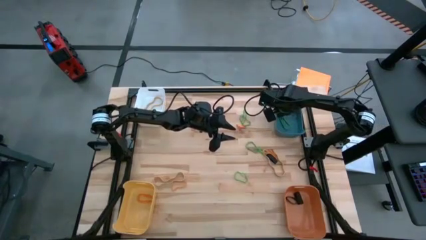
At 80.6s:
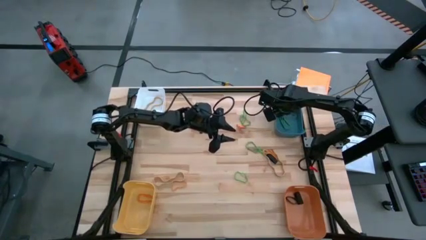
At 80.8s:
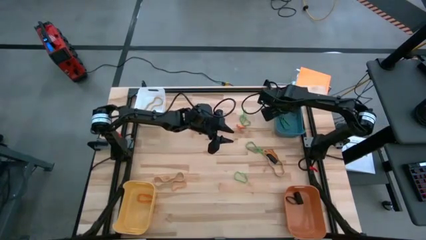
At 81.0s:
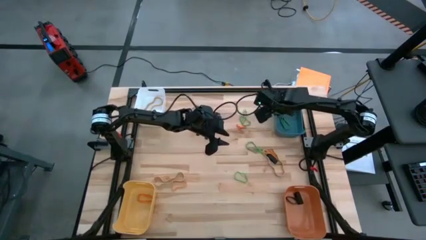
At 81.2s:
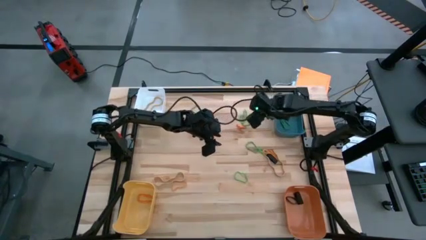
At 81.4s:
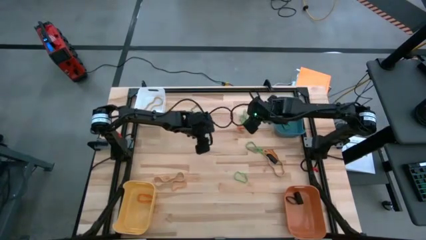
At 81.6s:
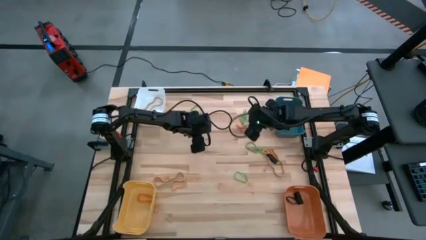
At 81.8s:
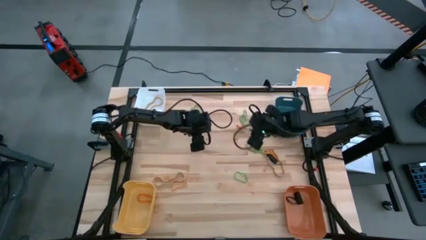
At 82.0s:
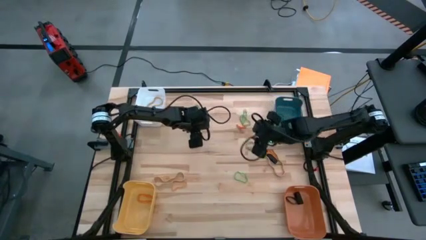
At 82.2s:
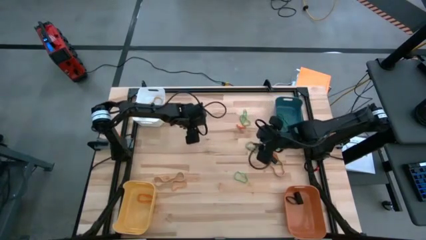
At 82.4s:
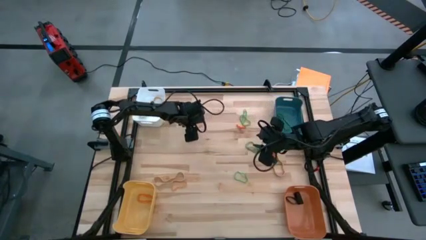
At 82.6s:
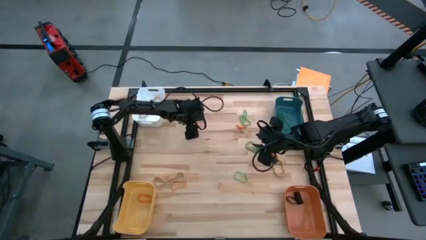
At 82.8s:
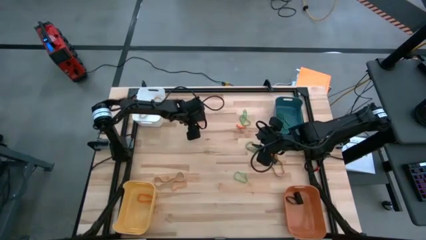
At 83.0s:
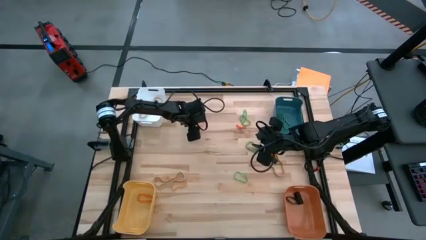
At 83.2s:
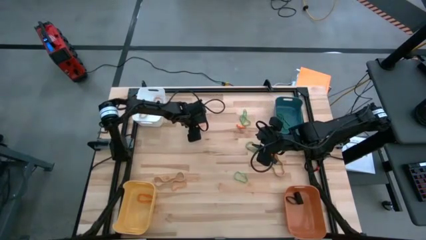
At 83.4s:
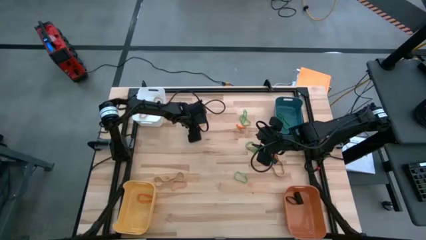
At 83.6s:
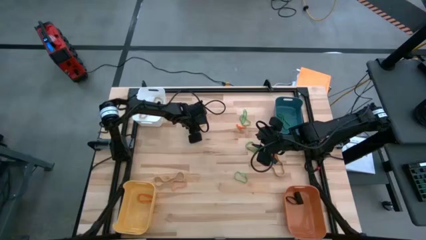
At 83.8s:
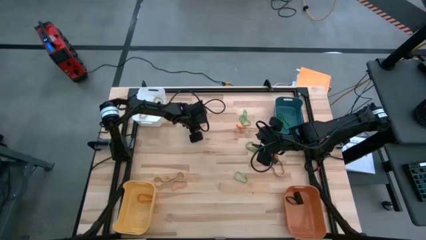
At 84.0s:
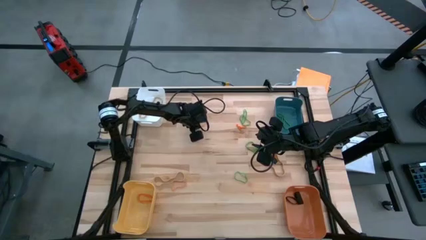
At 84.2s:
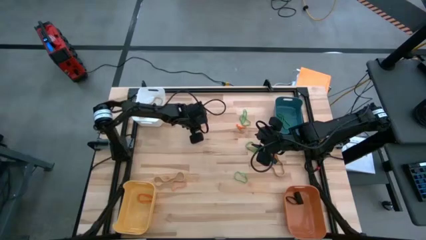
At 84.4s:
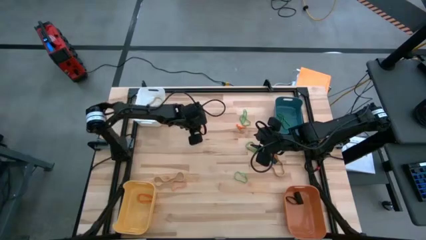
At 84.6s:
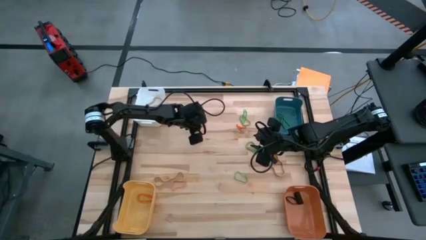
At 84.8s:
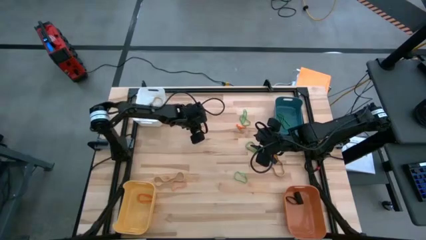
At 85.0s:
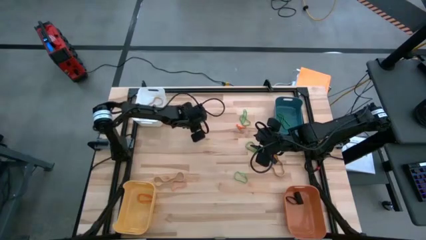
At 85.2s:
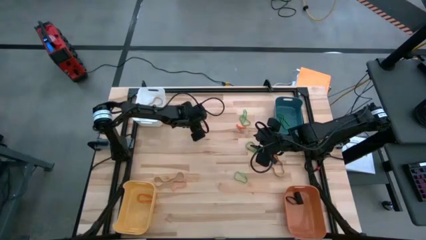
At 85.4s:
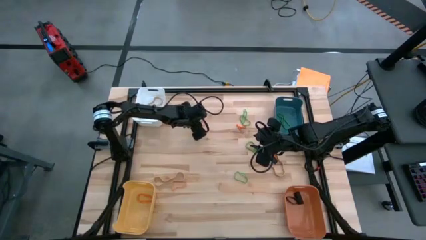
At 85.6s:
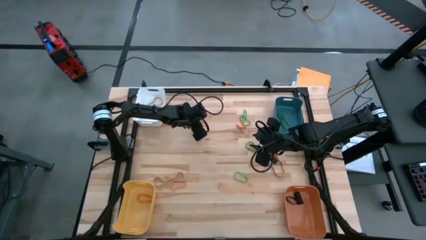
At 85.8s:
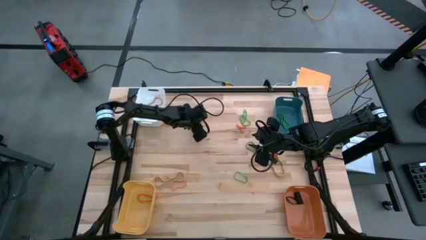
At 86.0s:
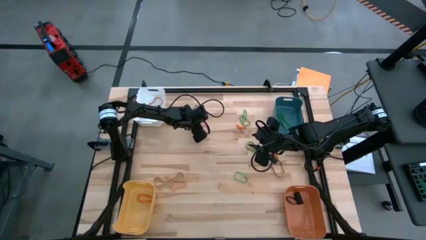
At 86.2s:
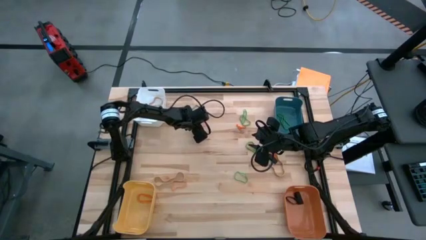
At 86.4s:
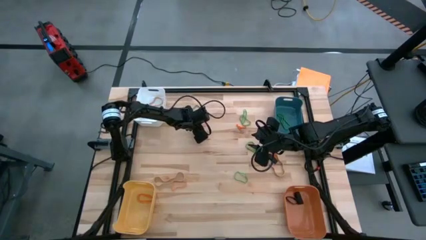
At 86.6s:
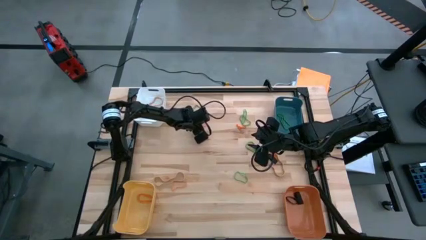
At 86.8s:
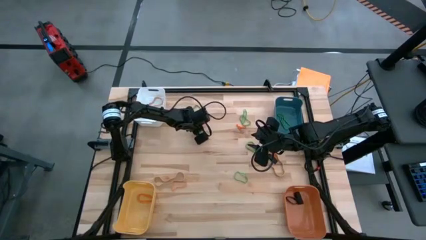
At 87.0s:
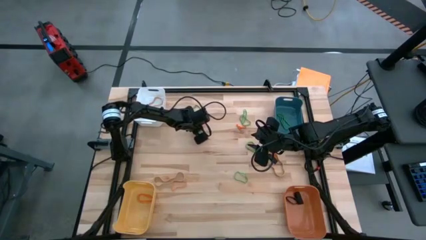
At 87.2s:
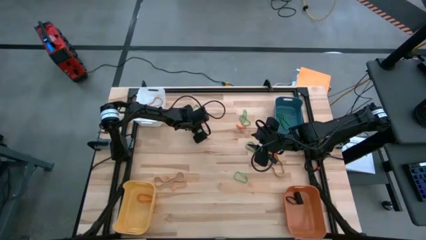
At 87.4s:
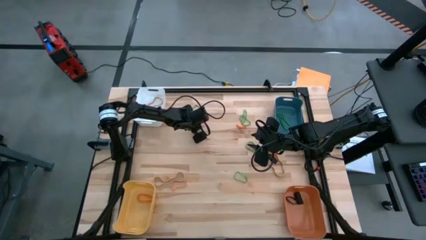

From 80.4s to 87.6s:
Task: Sort rubber bands into baskets
Put the orange rubber band into the yellow bin

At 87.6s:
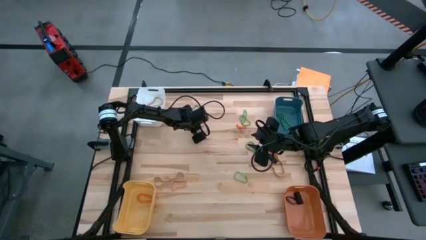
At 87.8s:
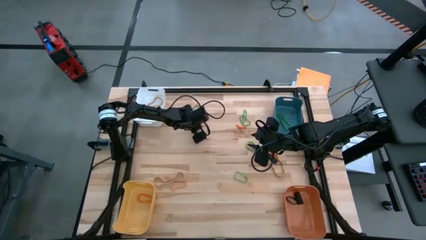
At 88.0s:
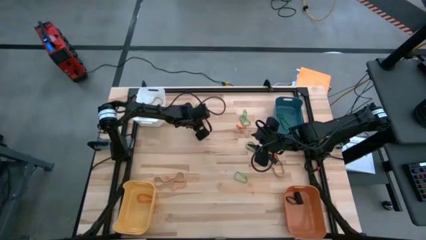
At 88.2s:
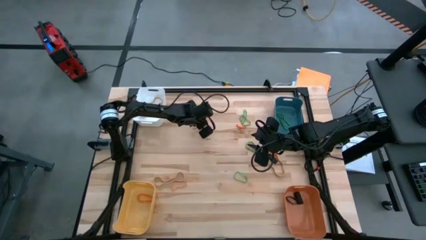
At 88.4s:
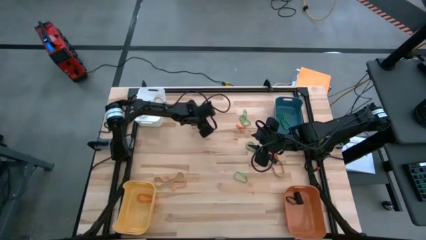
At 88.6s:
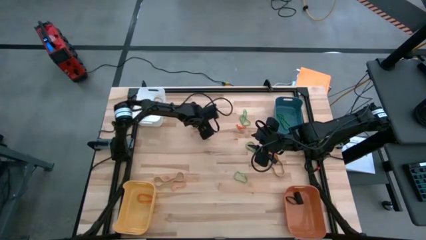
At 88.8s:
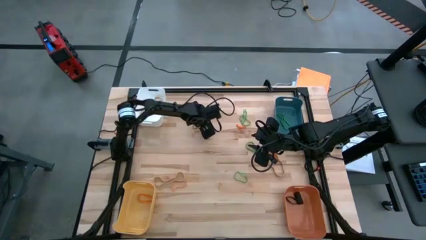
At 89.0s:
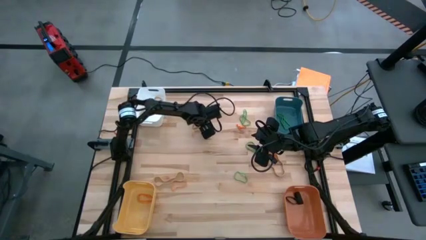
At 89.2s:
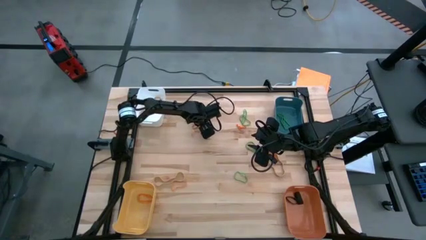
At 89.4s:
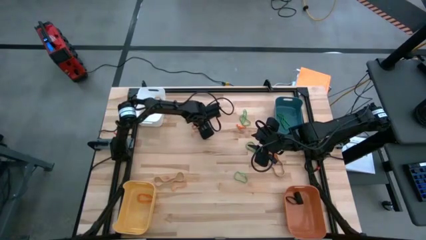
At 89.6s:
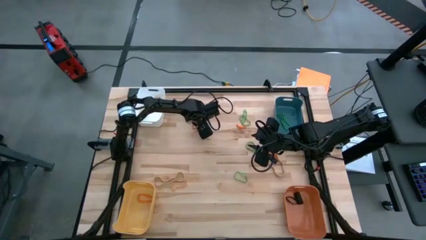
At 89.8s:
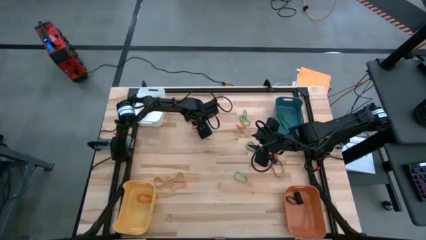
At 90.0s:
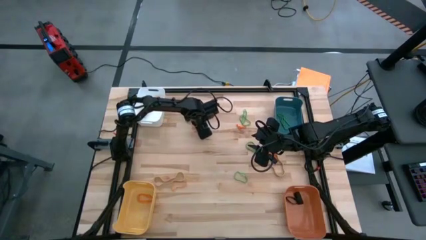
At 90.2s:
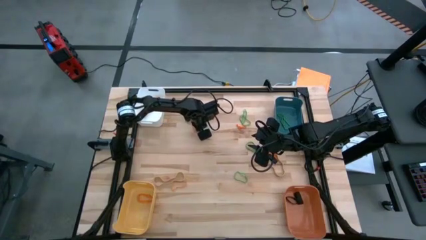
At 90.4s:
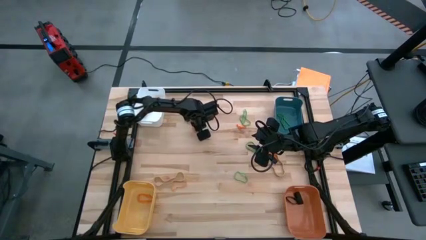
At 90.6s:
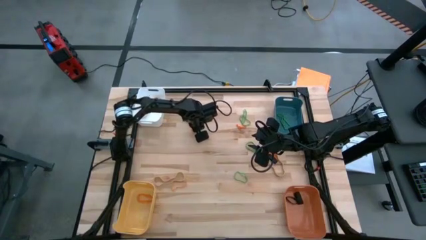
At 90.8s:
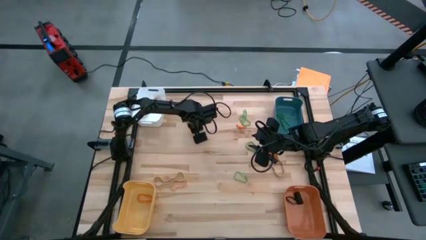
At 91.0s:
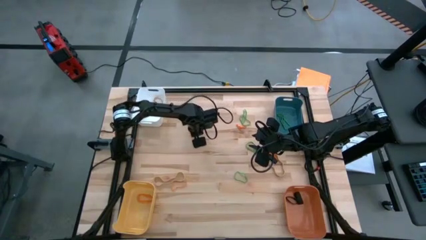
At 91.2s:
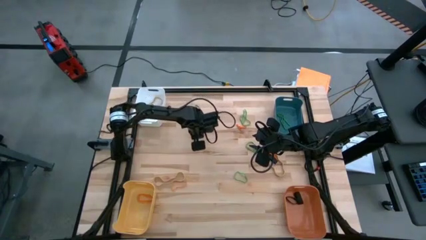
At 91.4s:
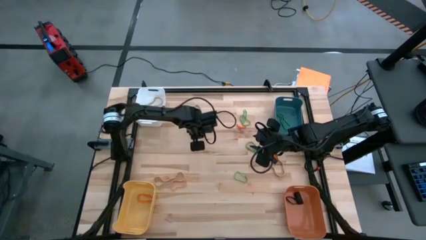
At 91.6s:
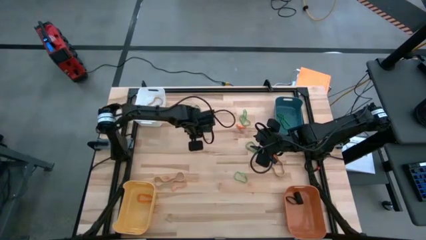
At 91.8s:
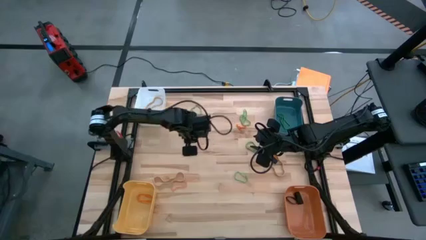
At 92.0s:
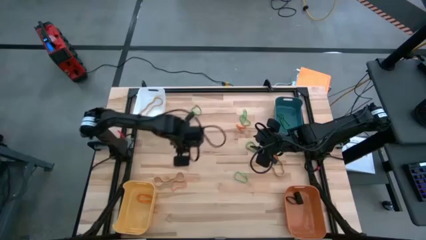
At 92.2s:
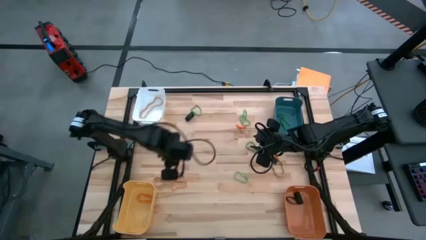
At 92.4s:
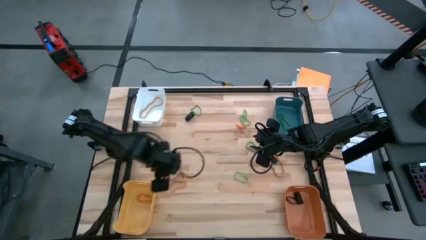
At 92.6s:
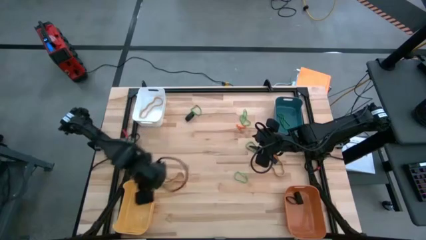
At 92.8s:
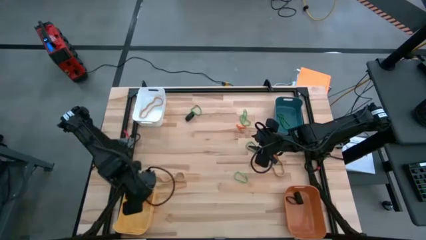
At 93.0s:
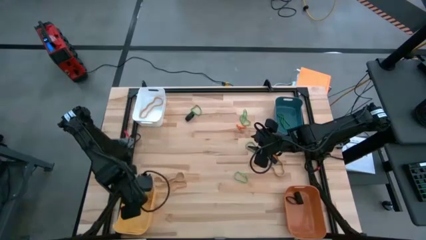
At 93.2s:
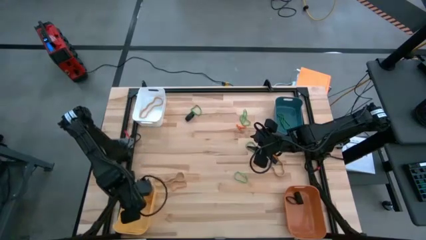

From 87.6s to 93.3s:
Put the orange rubber band into the yellow bin

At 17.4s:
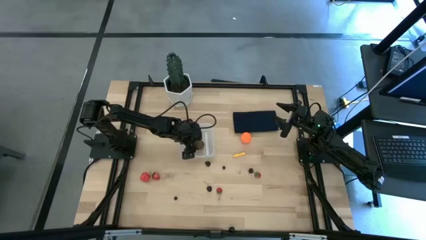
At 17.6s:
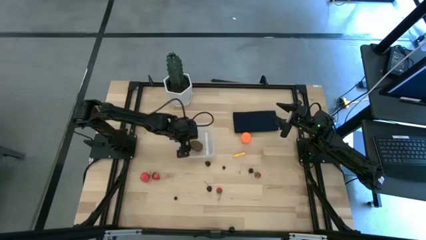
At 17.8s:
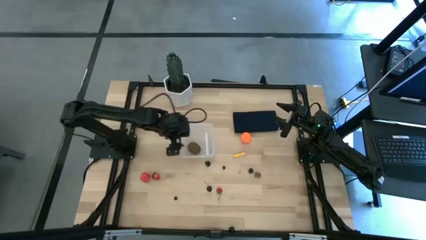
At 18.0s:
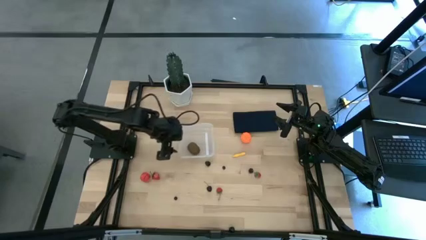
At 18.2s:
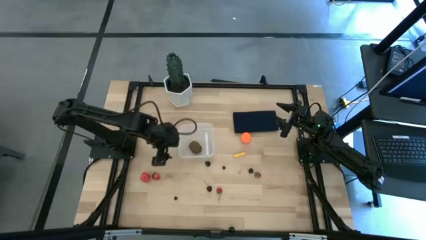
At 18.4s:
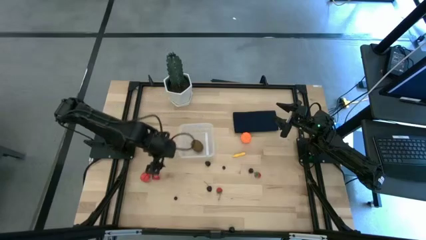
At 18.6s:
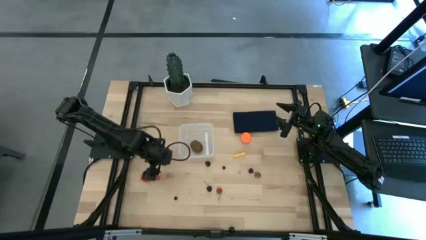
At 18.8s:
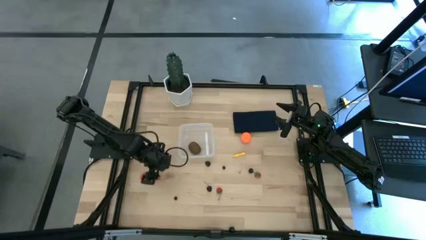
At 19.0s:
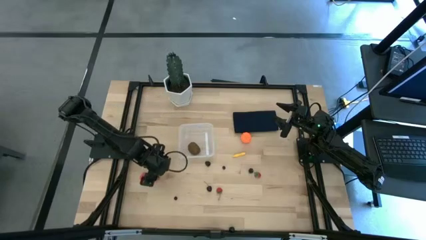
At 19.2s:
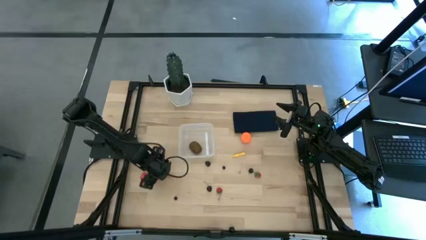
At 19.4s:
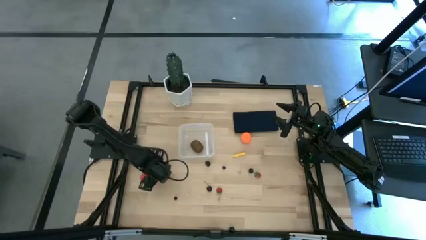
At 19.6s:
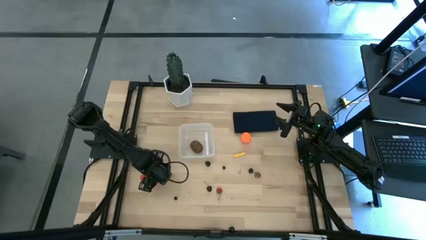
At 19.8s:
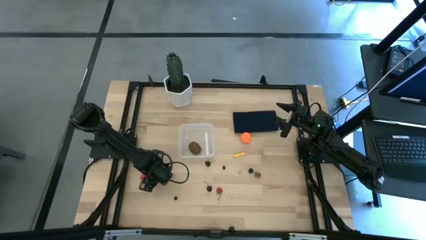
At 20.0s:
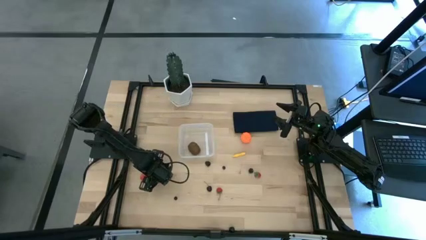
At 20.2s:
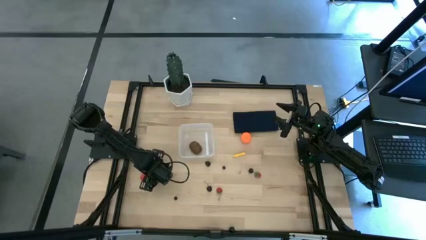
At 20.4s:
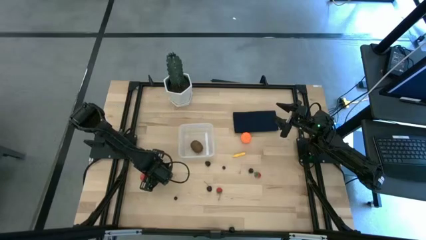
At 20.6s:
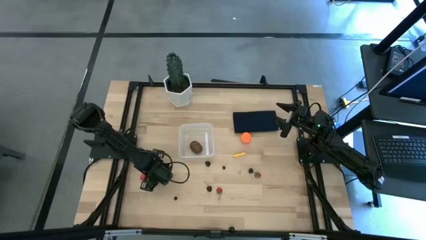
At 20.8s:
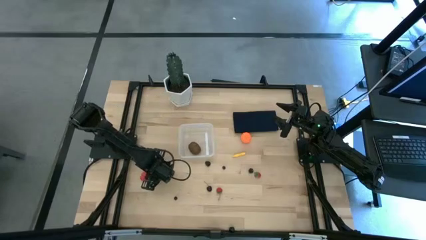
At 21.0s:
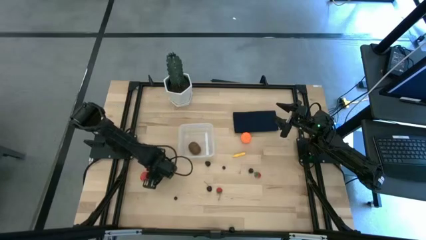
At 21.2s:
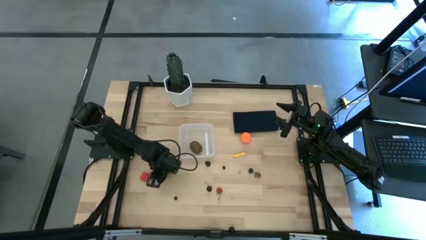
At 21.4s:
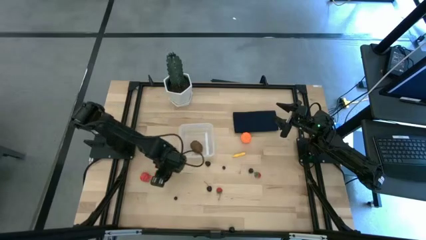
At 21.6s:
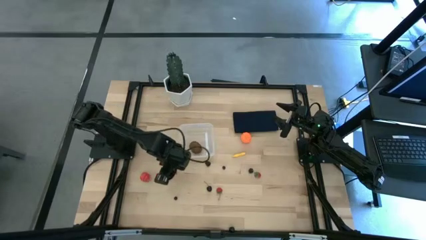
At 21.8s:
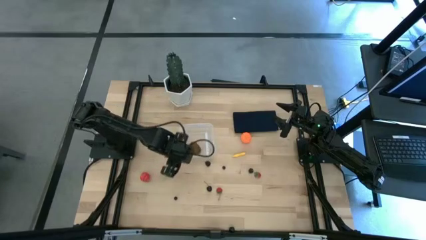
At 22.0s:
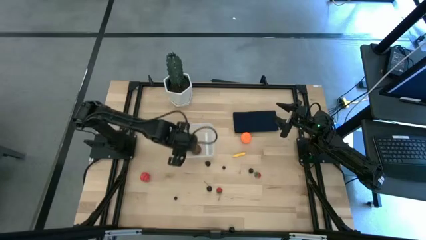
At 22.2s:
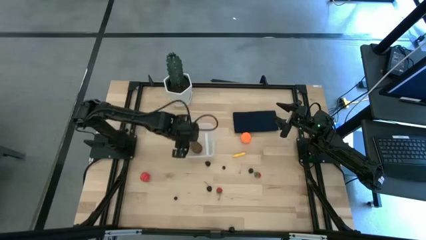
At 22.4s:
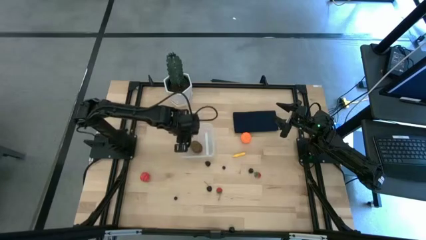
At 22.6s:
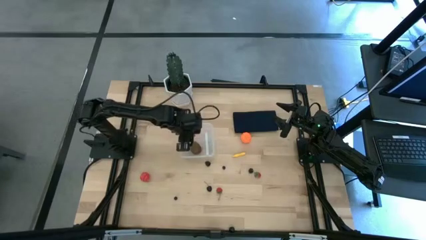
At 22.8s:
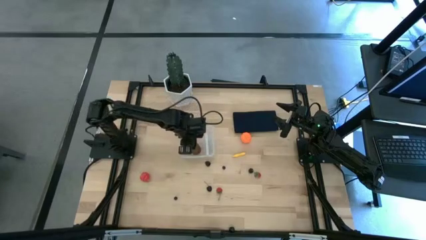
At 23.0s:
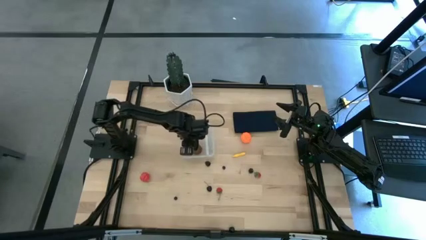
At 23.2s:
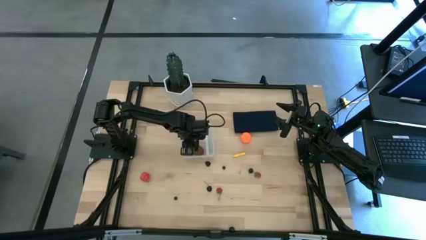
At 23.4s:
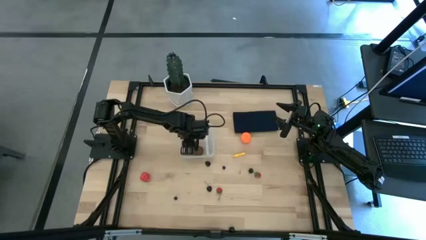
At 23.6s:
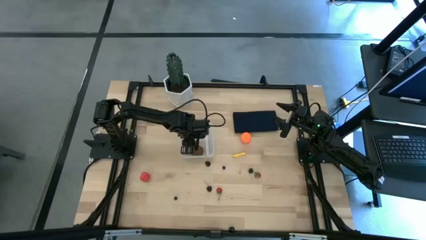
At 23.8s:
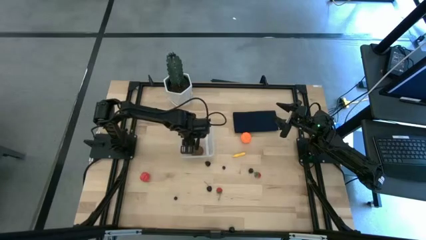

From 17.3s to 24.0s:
Task: Pick and placing Produce into tupperware
Put the left red strawberry into the transparent container
